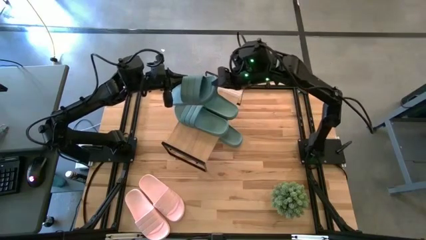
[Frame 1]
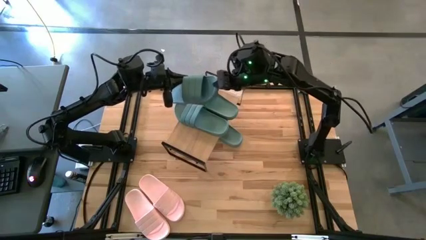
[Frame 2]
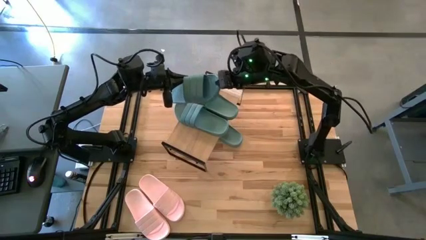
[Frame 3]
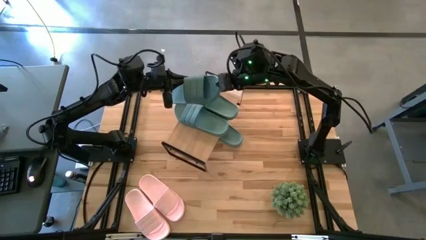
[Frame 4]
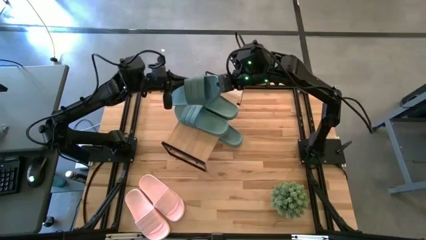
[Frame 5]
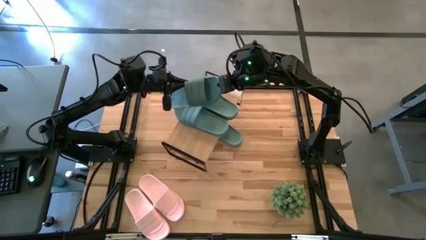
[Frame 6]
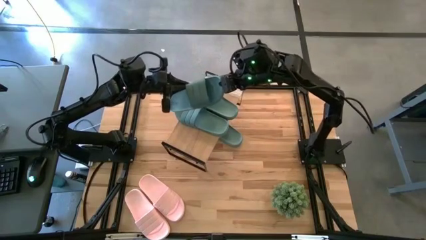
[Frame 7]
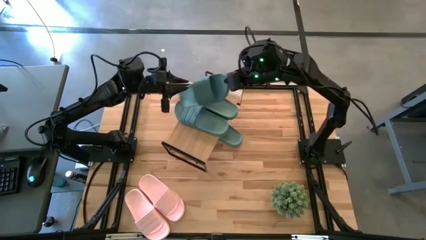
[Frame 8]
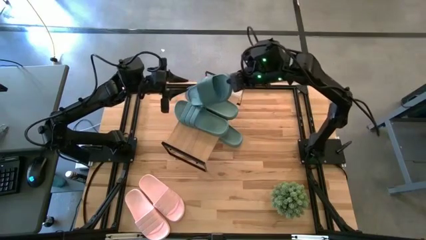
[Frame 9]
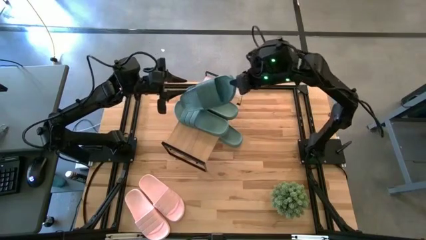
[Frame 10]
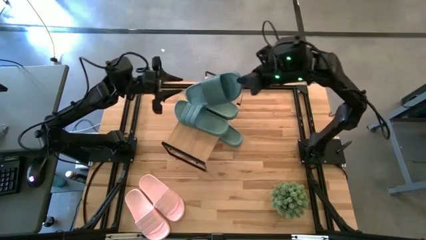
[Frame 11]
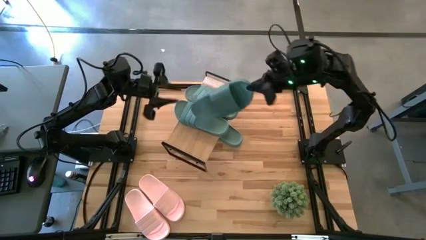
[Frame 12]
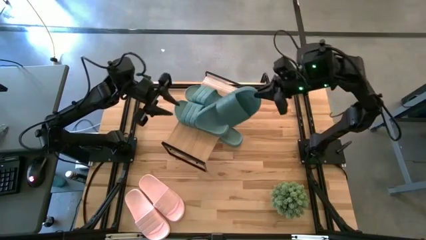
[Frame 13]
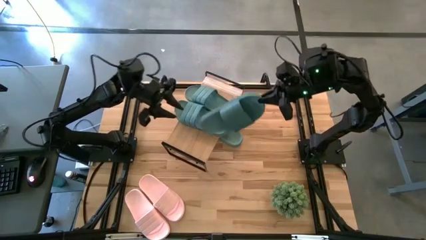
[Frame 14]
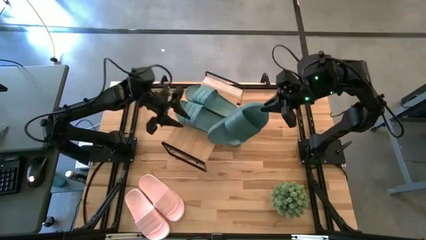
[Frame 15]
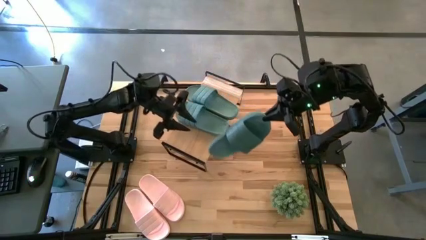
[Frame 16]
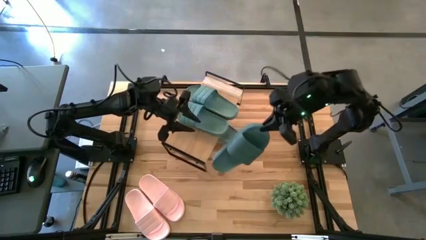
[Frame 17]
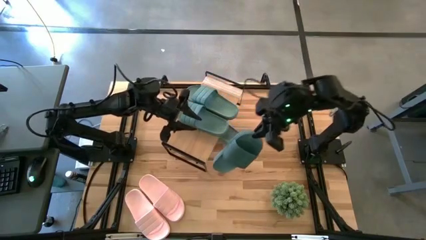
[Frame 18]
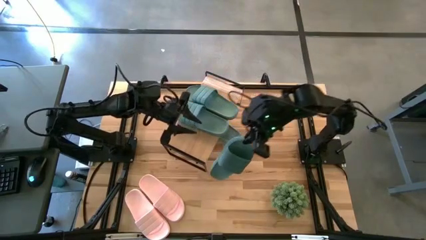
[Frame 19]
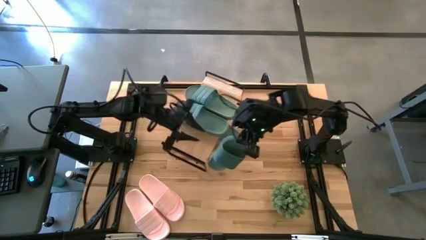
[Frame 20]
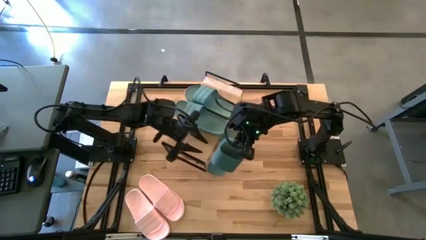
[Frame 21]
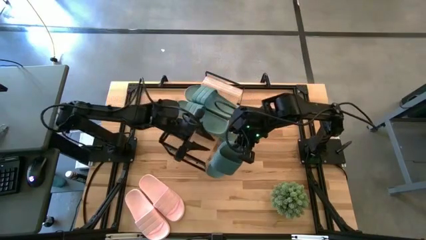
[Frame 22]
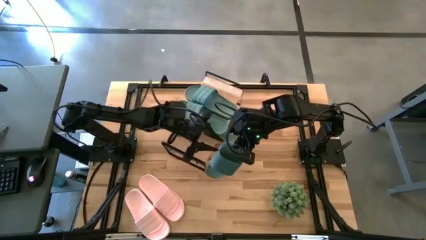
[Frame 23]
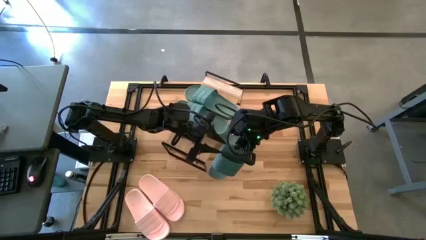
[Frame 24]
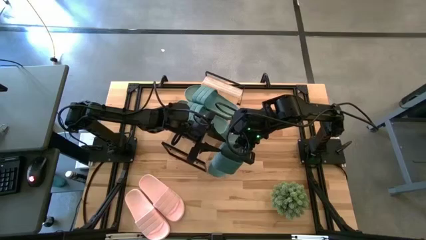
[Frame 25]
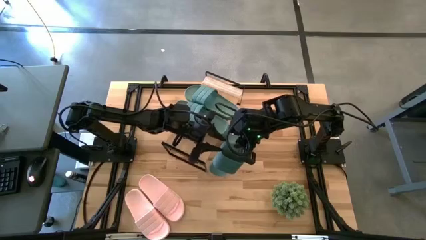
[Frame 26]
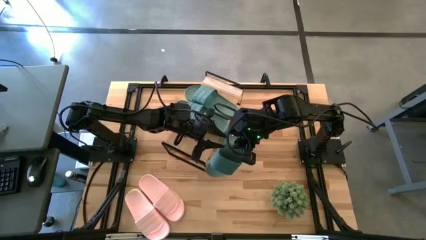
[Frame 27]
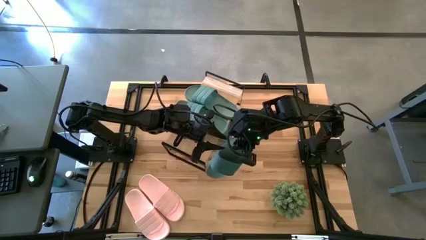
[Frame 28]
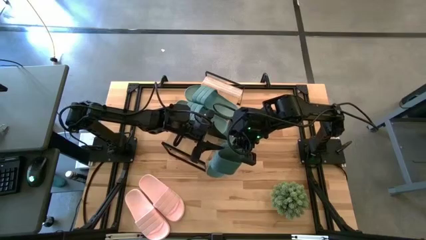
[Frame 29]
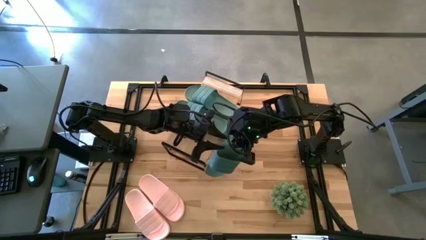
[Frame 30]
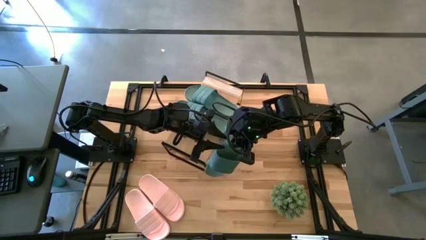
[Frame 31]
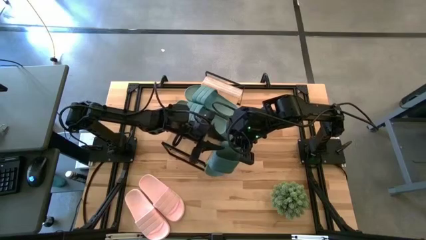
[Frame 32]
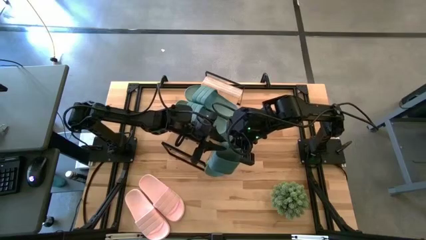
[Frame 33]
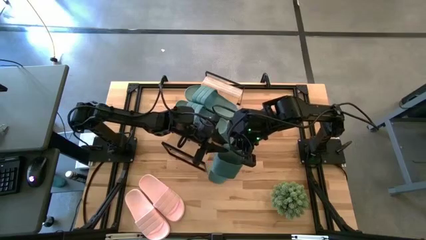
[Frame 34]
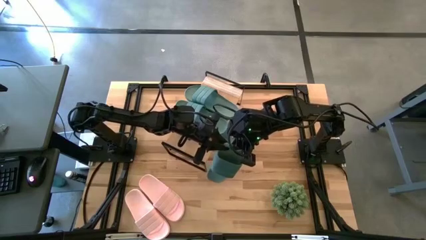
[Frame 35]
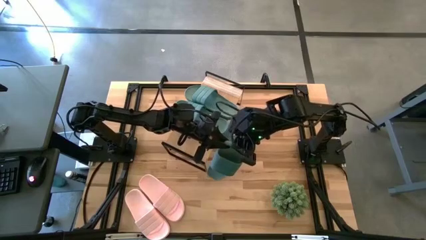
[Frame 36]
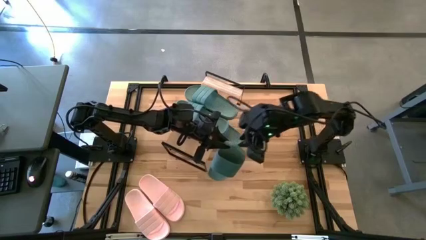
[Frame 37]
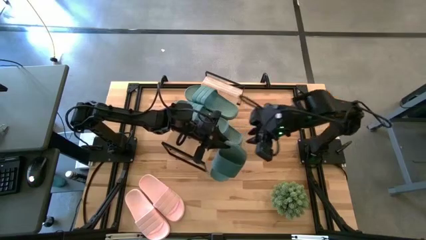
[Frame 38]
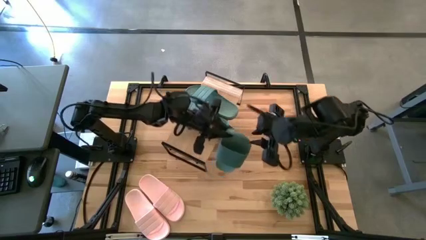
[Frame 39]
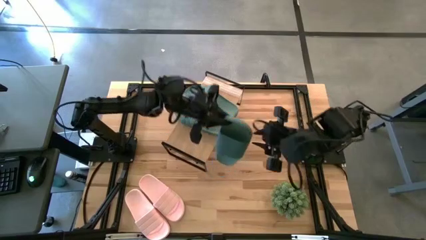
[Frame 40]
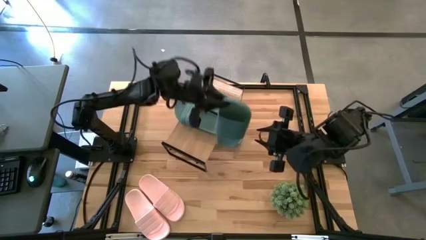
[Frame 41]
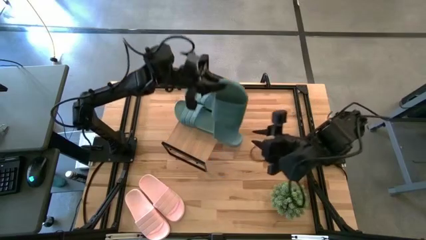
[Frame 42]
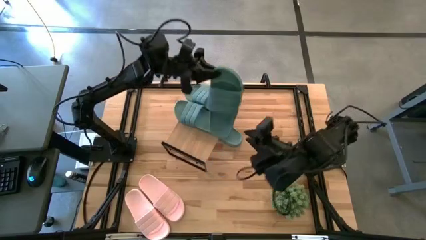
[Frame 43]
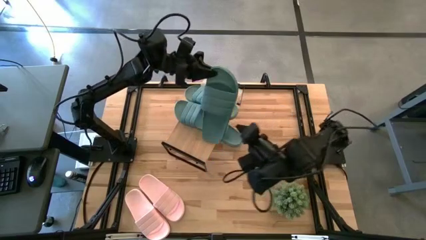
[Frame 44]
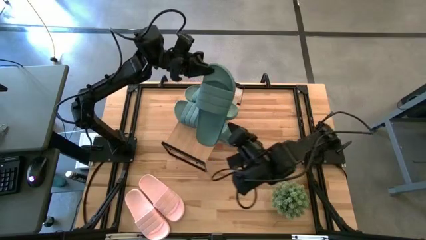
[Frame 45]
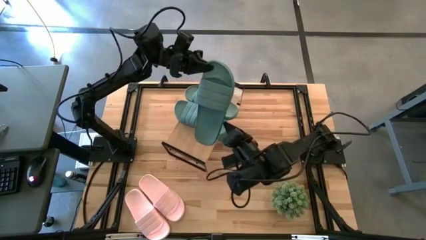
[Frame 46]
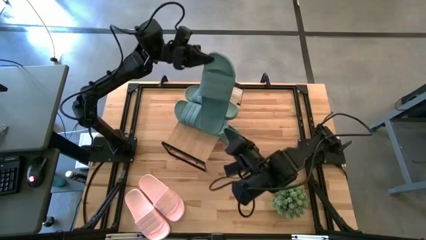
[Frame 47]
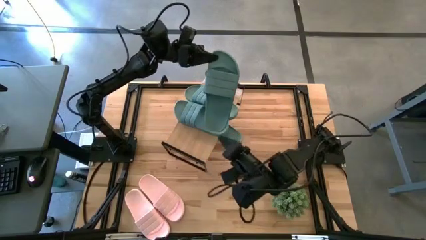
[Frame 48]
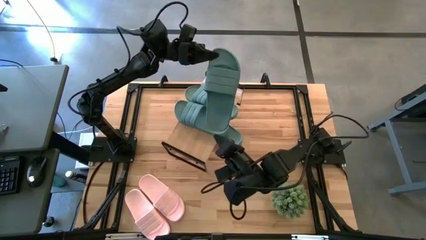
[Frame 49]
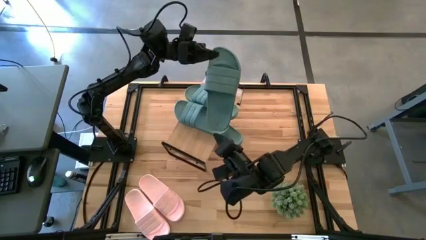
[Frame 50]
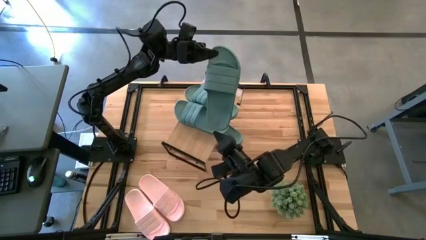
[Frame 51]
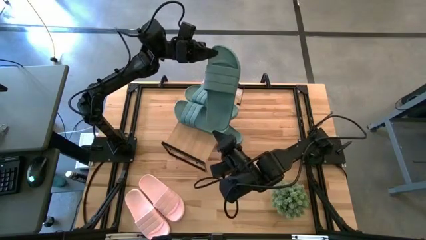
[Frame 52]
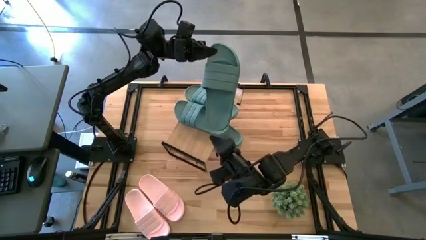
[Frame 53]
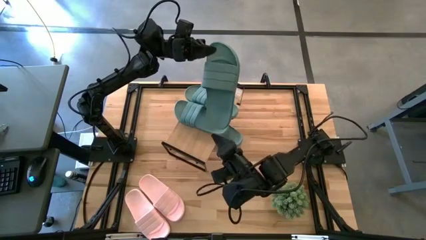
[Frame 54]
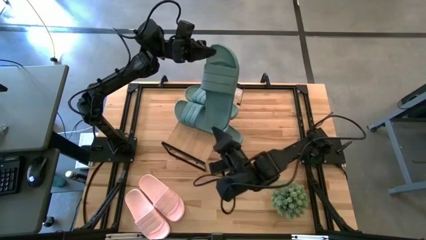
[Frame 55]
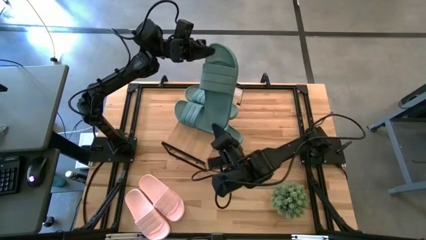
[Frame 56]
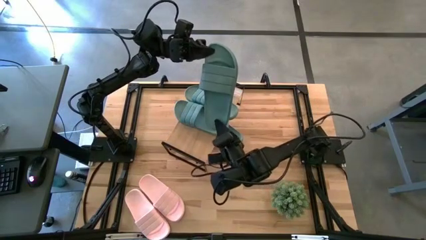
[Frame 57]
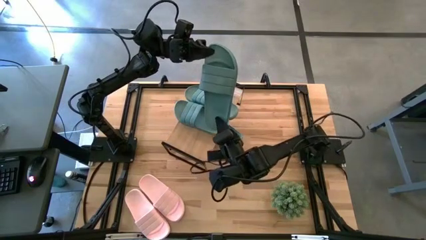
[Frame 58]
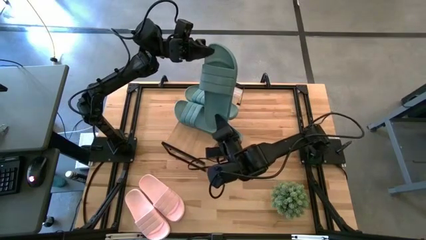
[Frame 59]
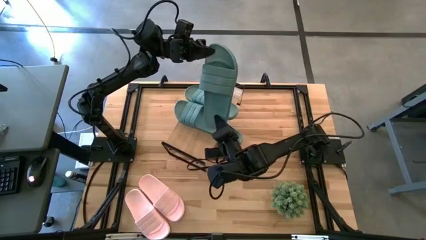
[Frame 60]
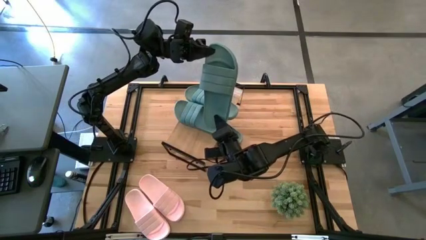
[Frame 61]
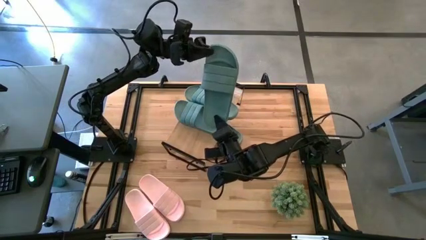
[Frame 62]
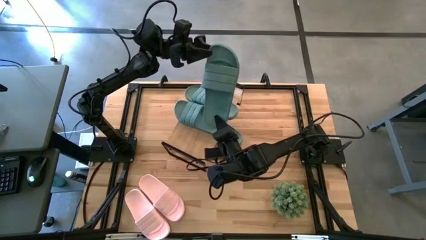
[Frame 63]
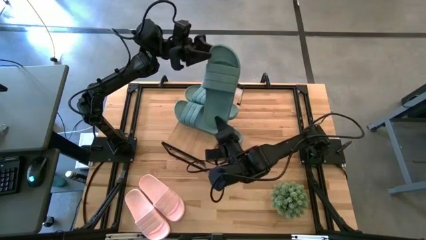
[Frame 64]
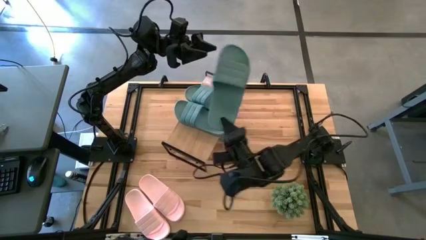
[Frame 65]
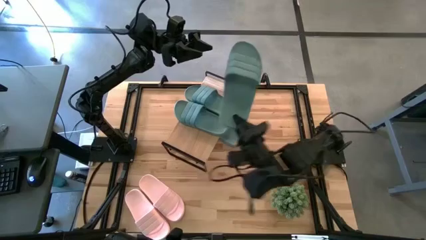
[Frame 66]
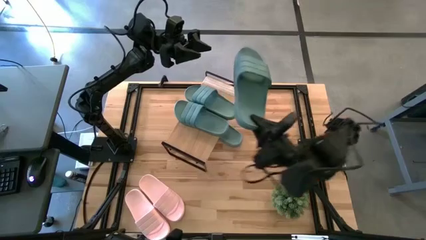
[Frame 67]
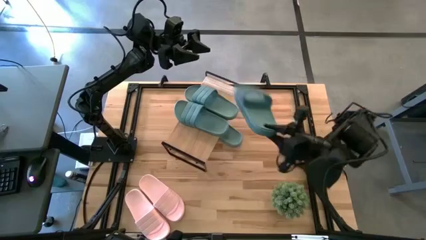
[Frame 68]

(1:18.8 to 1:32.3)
Task: Pick and place slides into the shelf
Put the green slide under the shelf
